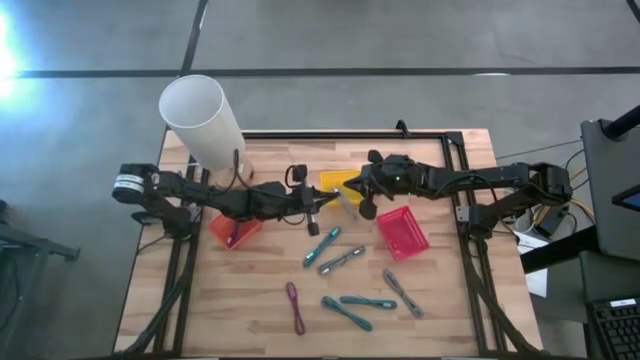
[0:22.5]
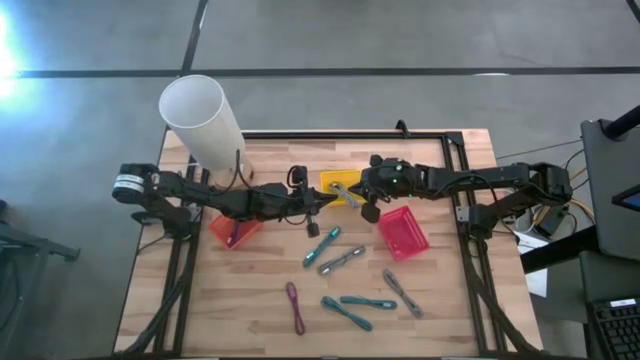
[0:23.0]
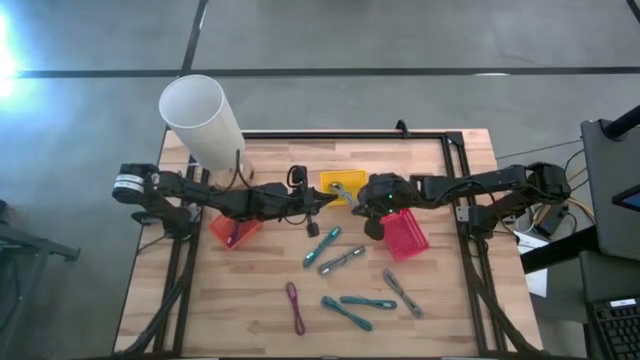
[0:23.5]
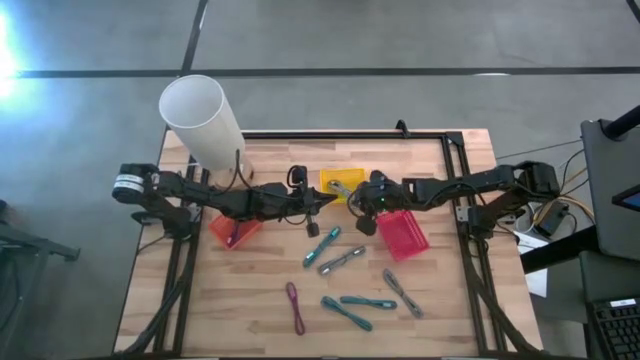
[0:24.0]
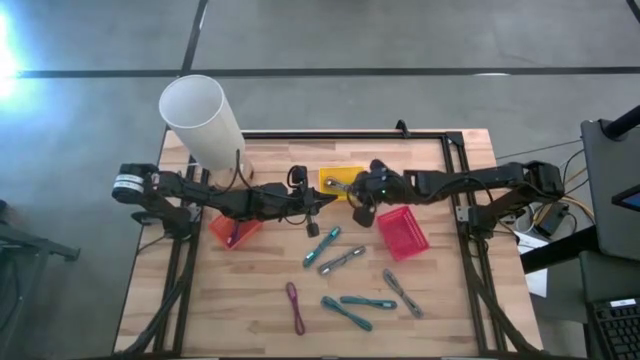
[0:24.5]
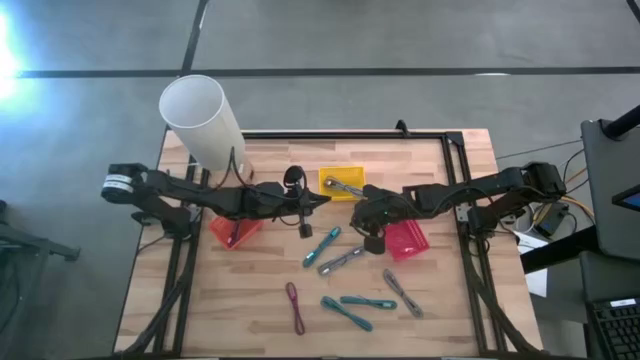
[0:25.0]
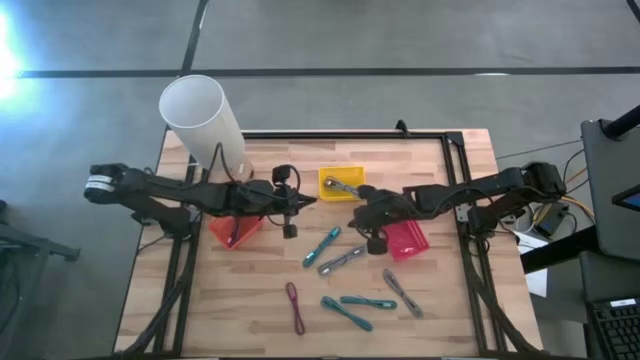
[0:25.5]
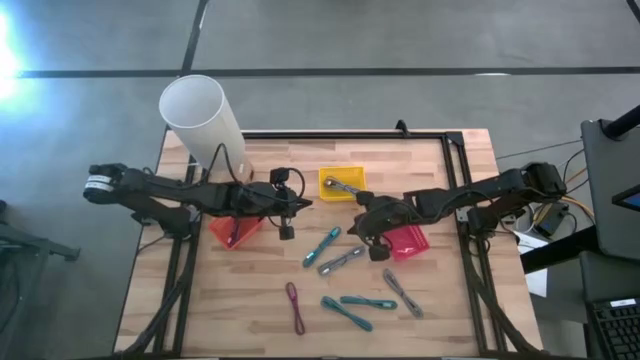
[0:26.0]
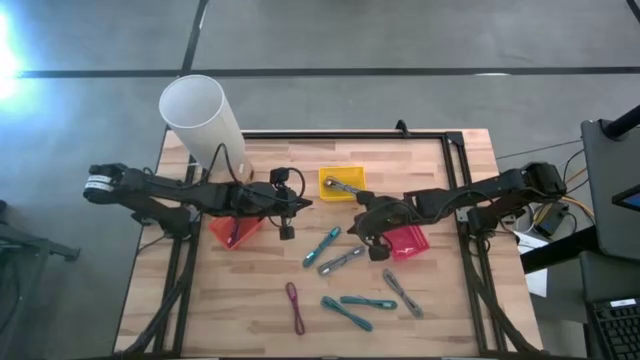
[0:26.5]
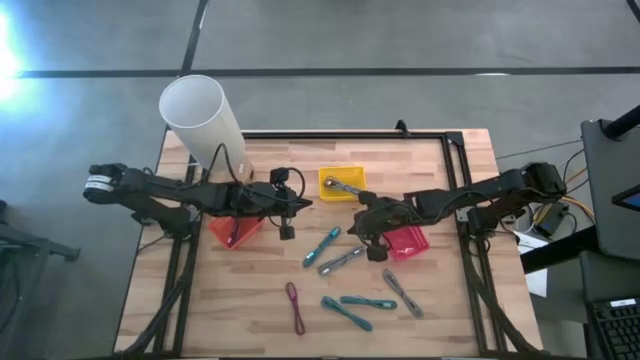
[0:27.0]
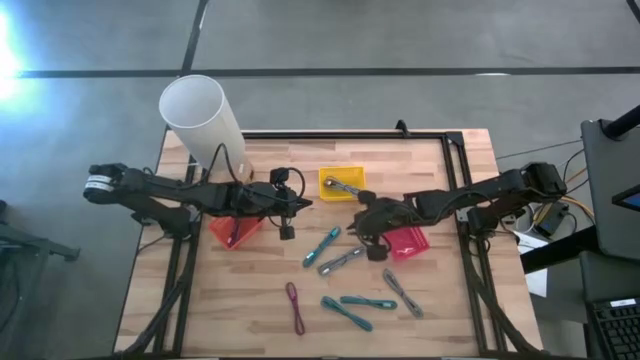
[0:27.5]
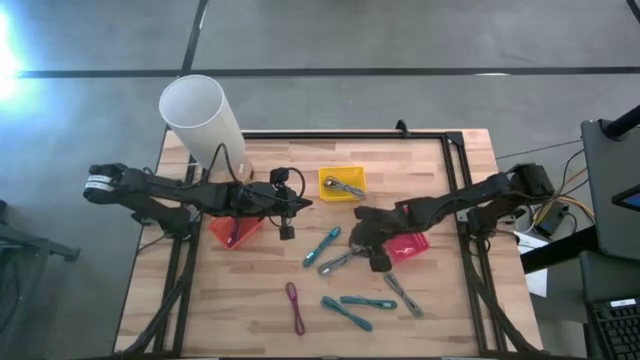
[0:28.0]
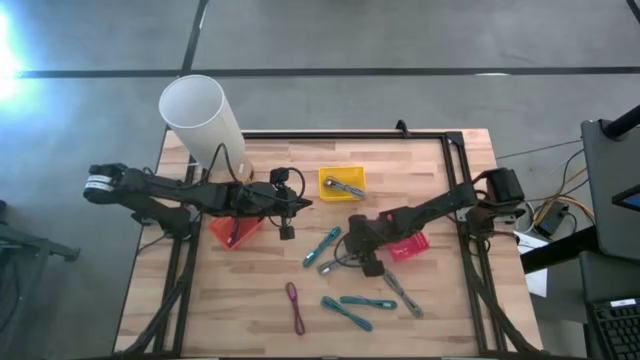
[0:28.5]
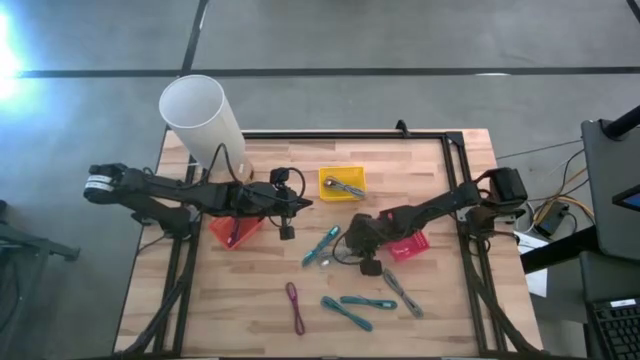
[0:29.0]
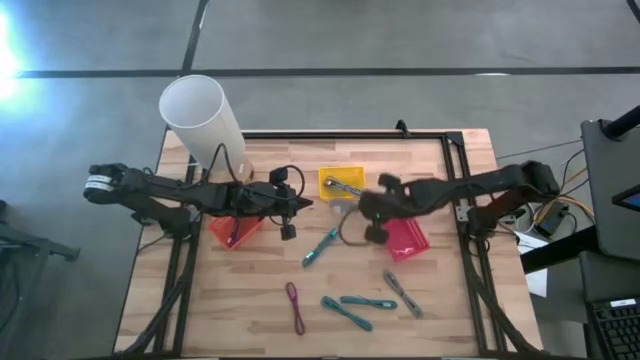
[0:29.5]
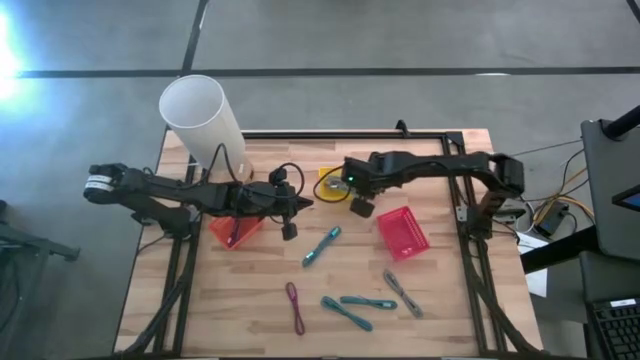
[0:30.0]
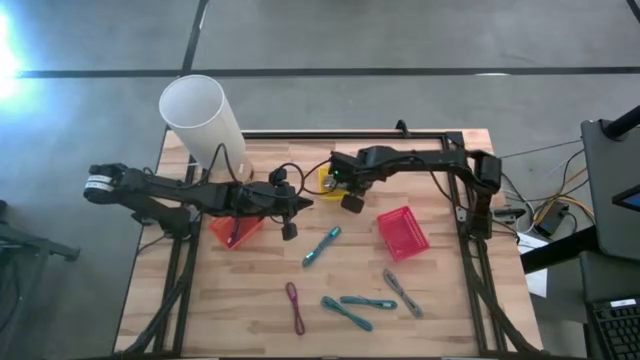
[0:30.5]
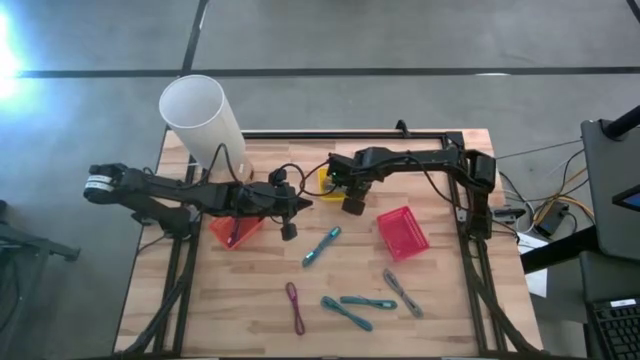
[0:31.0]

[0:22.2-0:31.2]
Task: Pick & Place USB Port
Put the top white patterned charger cable into the yellow bin

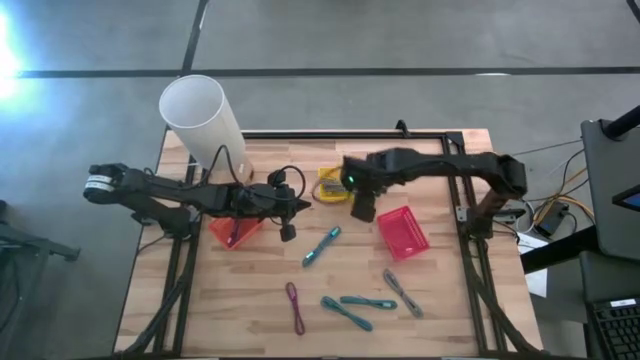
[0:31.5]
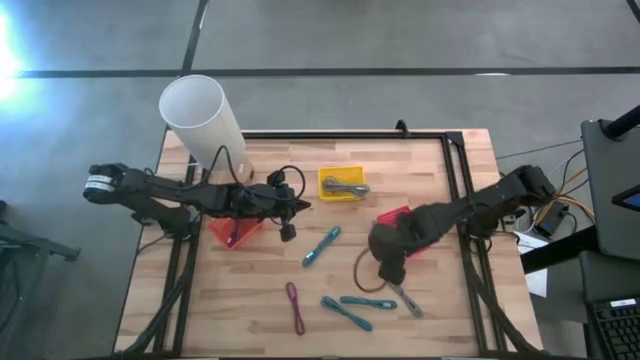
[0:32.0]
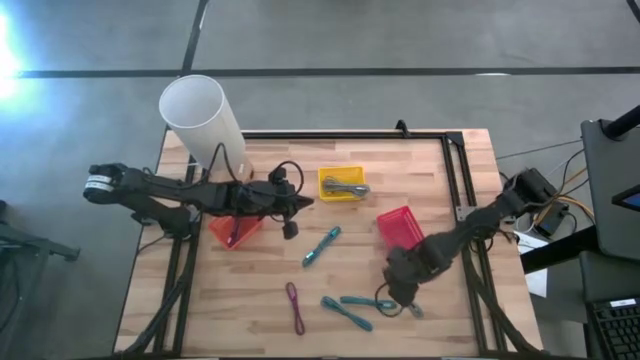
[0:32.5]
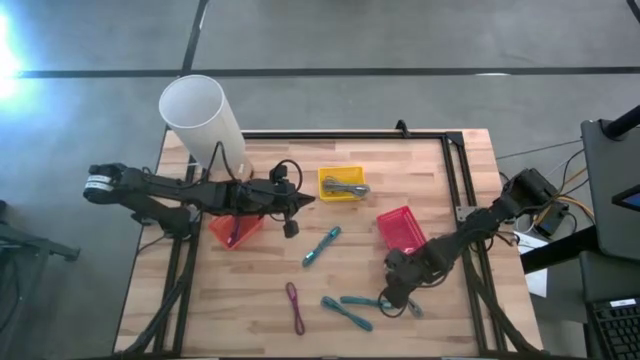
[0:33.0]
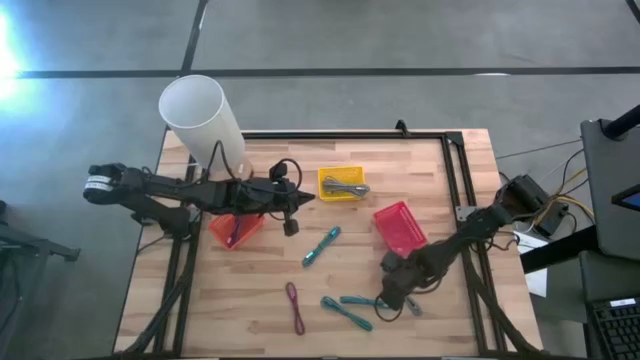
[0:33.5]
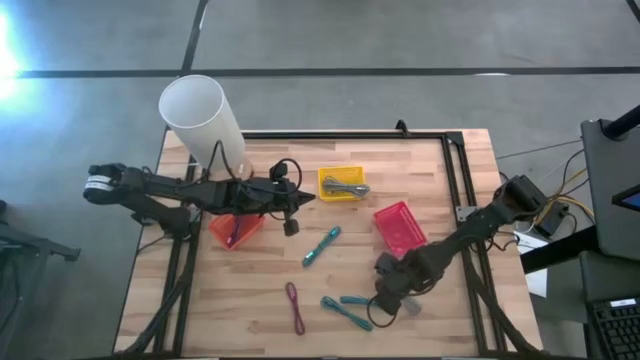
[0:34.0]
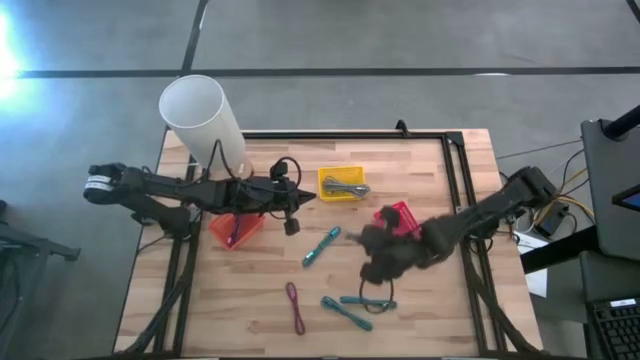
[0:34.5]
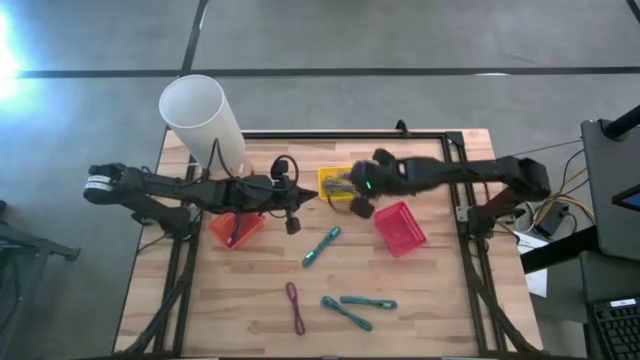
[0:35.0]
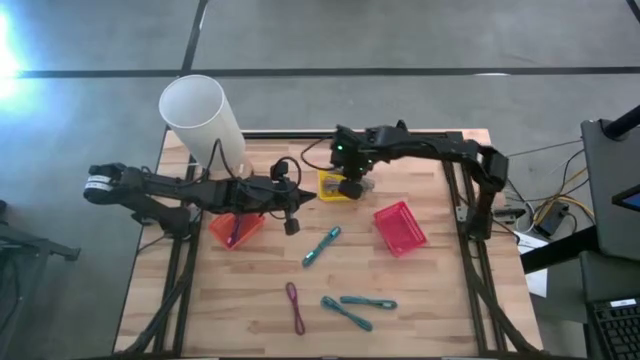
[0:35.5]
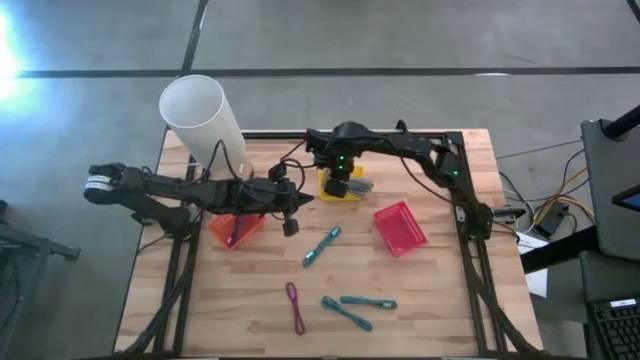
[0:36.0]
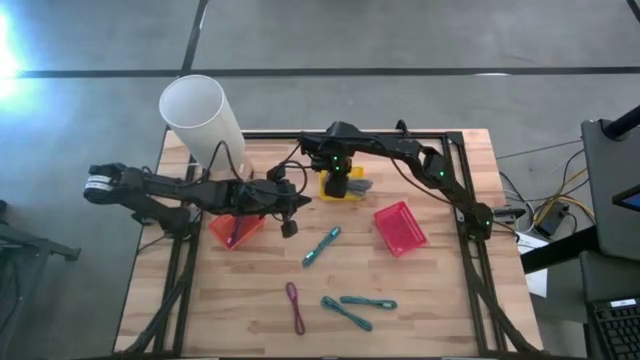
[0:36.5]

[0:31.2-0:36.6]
Put the white patterned charger cable into the yellow bin

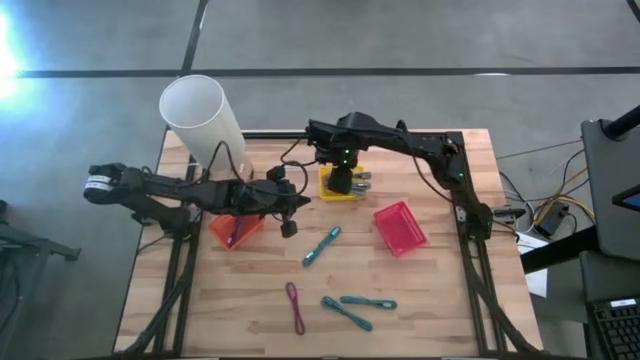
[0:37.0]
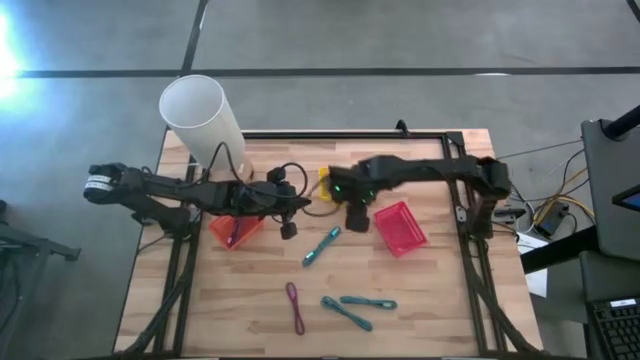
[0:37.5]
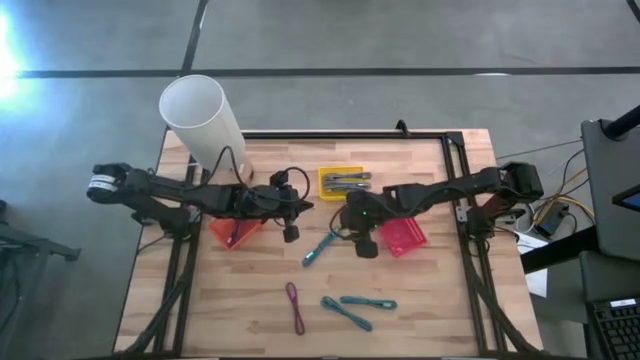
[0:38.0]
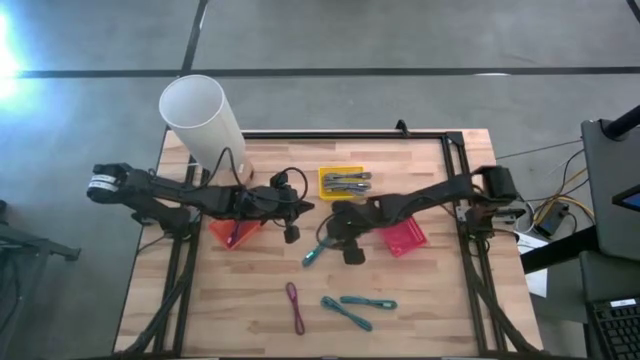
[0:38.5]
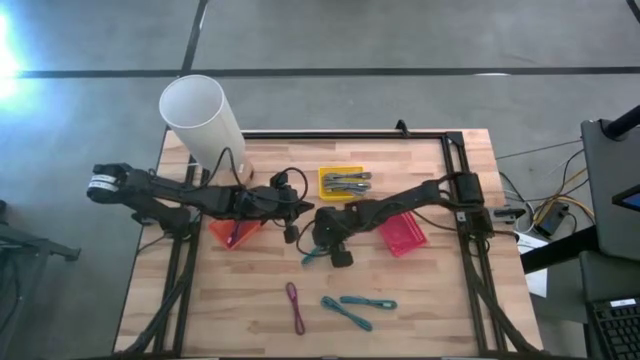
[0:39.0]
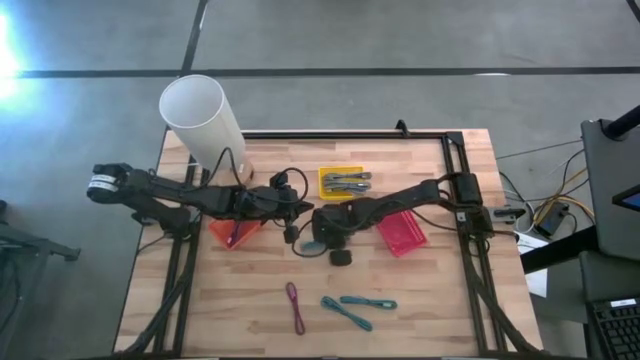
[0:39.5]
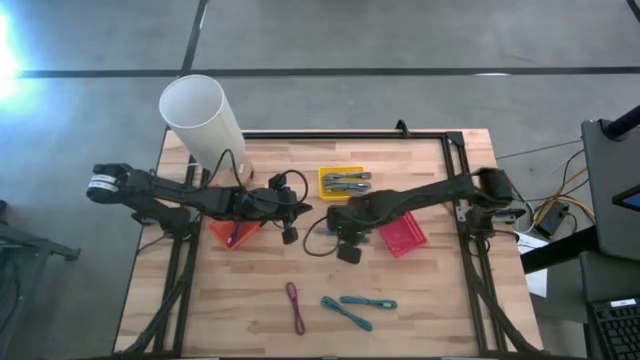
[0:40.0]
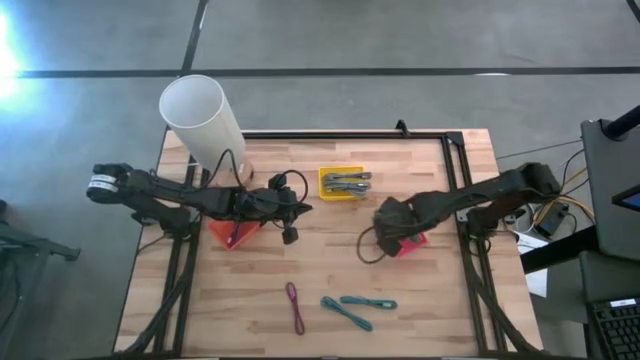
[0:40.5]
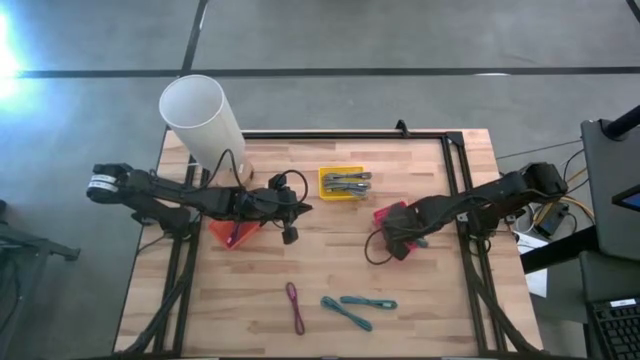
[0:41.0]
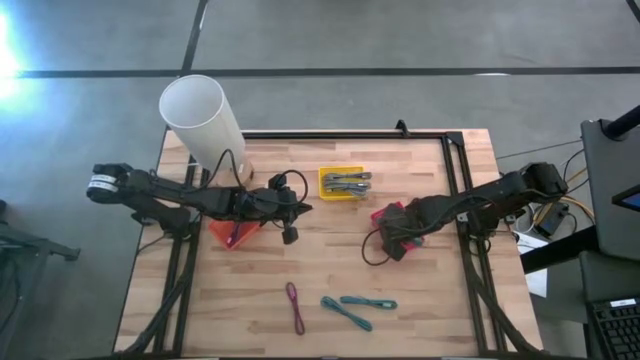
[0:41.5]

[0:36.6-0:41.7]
Put the top blue patterned charger cable into the red bin

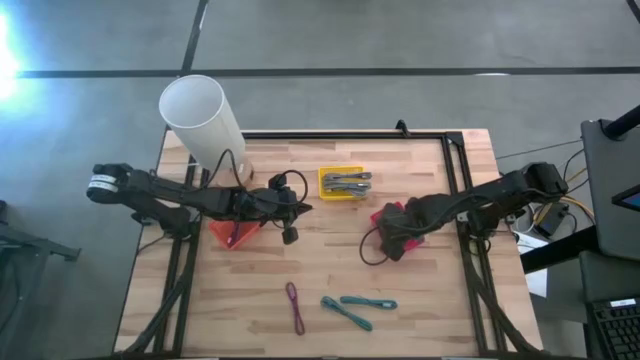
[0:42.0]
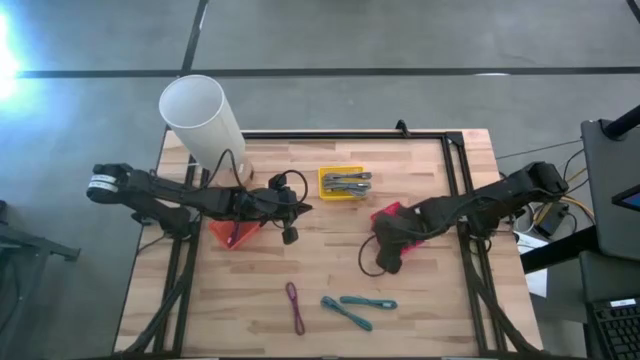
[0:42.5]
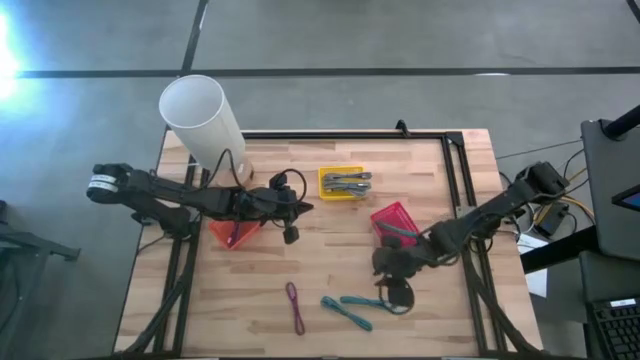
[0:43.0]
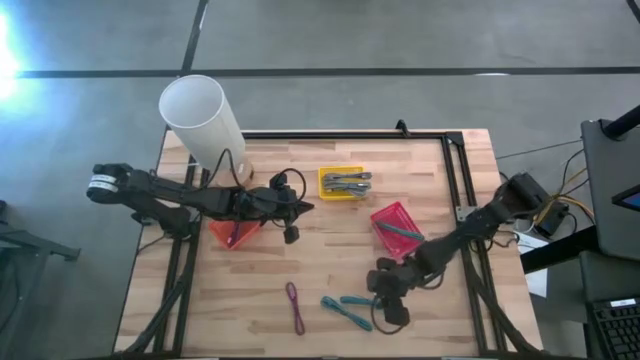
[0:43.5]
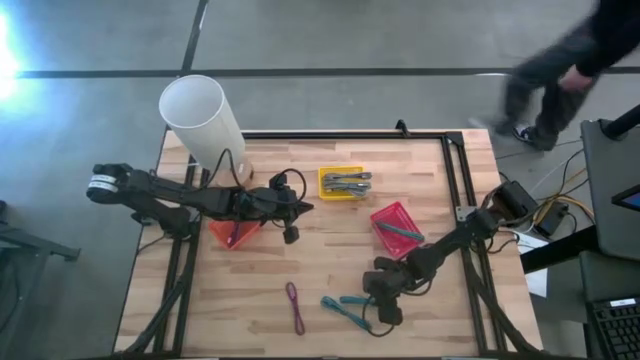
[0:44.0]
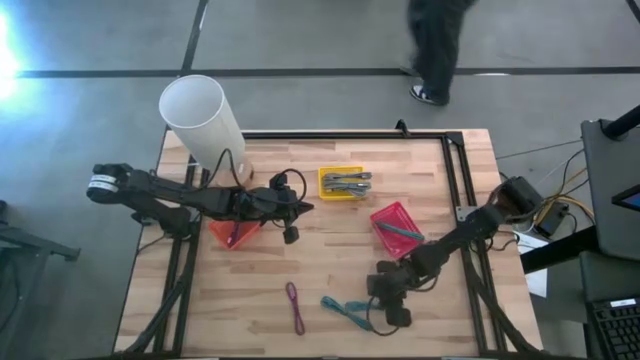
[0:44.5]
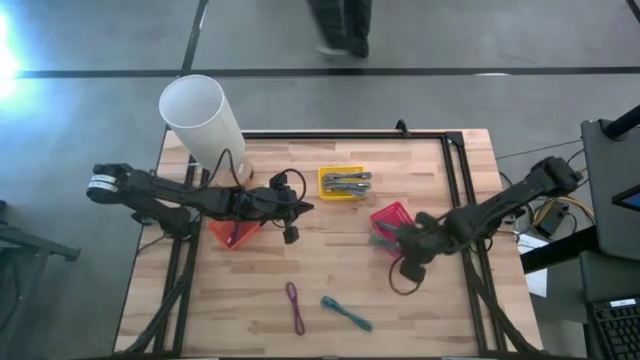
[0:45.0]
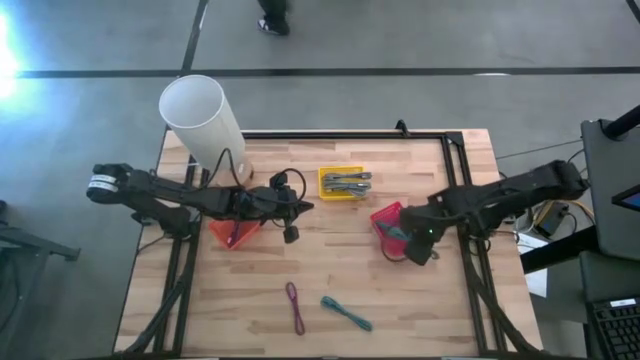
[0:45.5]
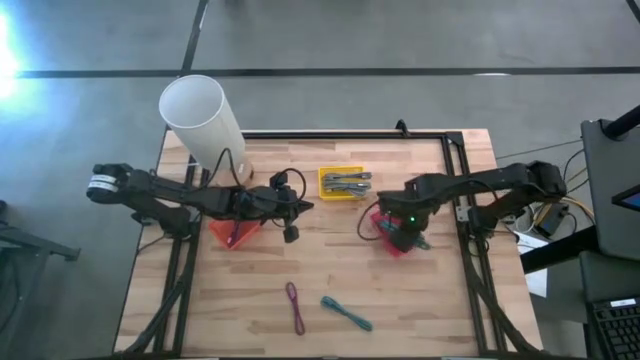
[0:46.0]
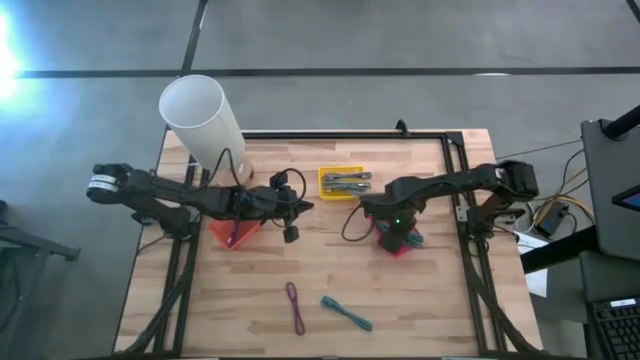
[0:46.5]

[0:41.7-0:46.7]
Put the top blue patterned charger cable into the red bin
